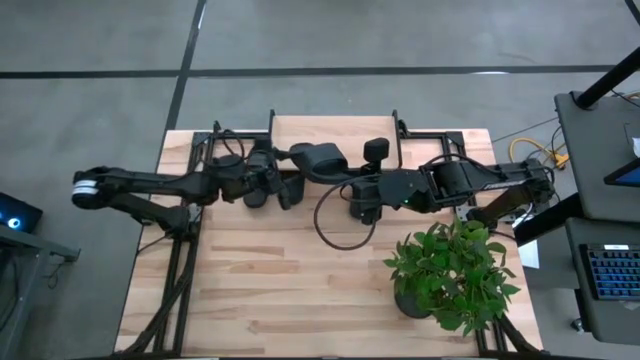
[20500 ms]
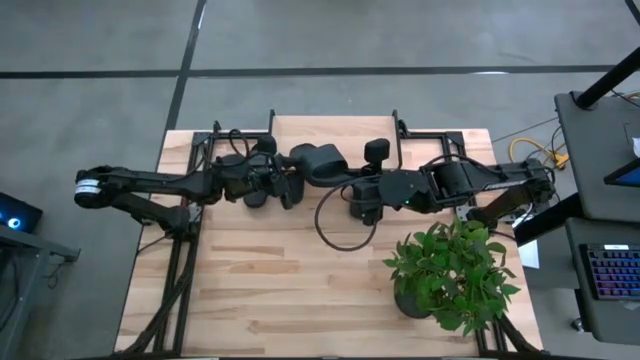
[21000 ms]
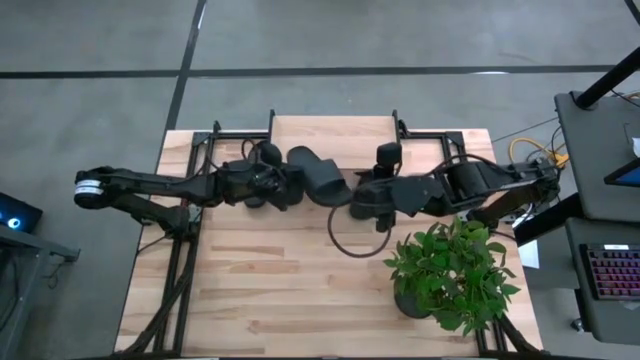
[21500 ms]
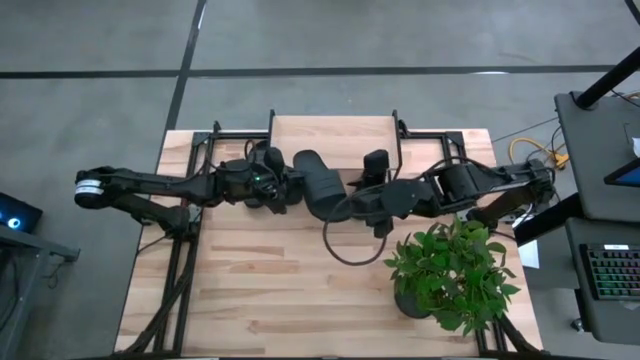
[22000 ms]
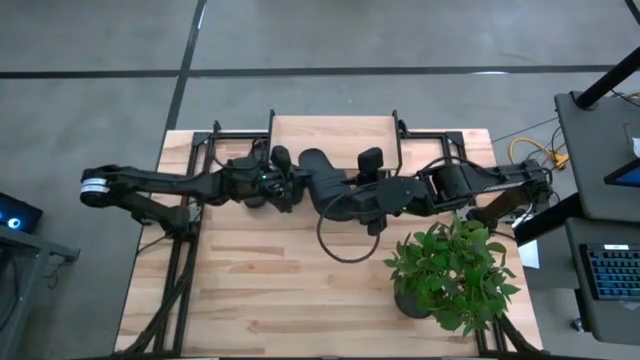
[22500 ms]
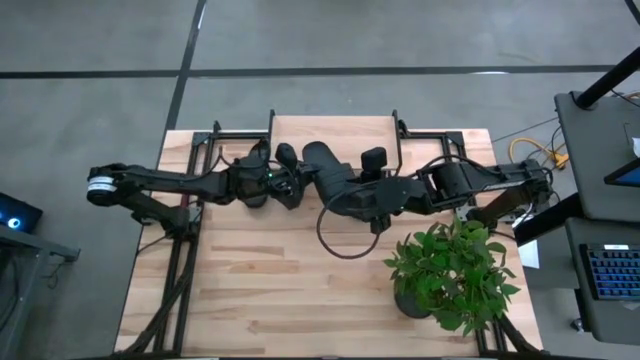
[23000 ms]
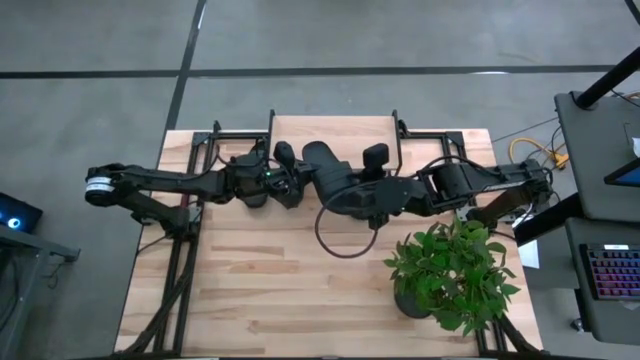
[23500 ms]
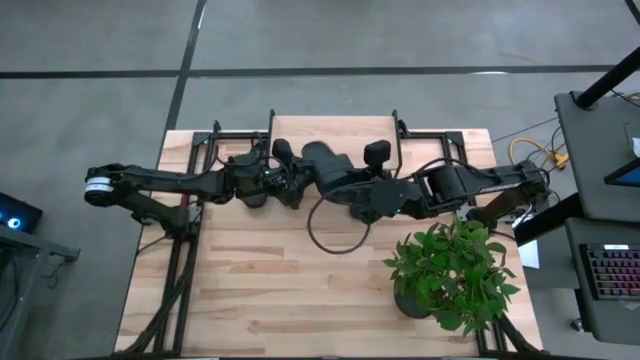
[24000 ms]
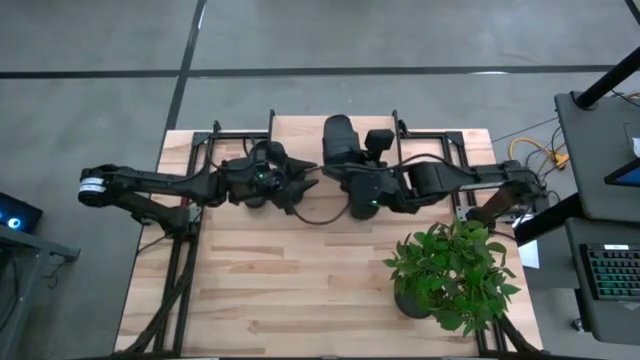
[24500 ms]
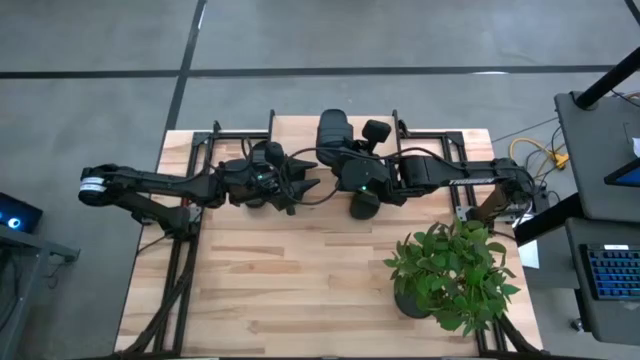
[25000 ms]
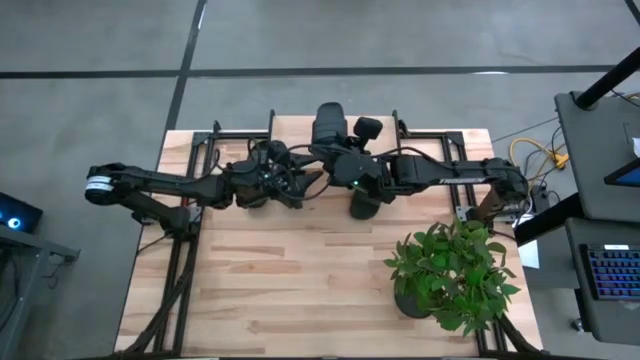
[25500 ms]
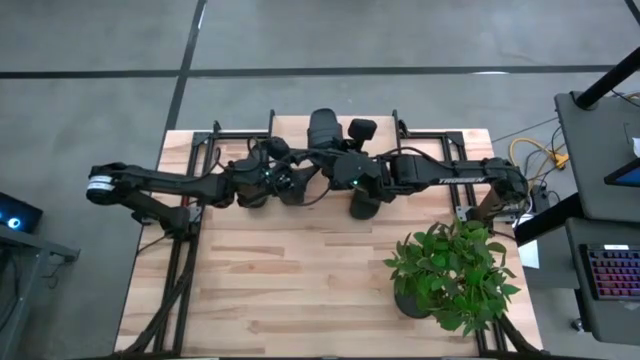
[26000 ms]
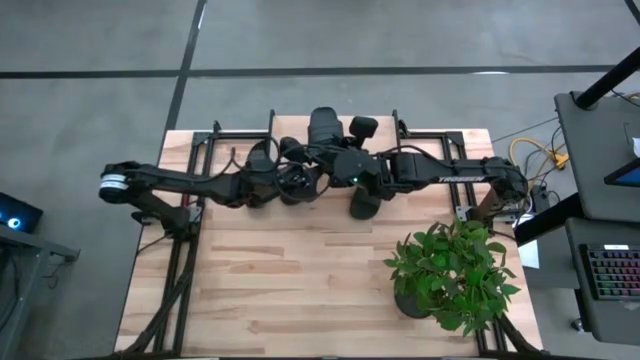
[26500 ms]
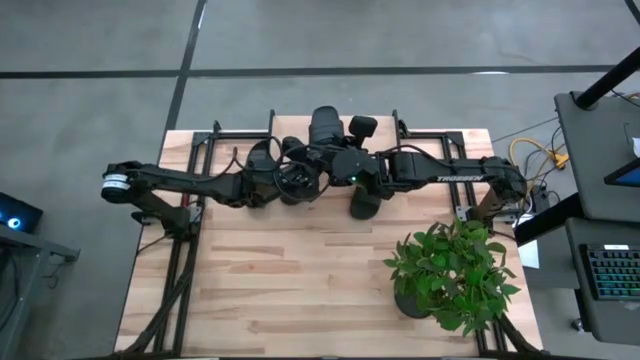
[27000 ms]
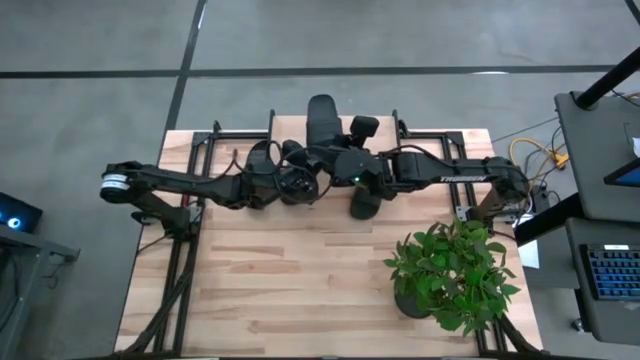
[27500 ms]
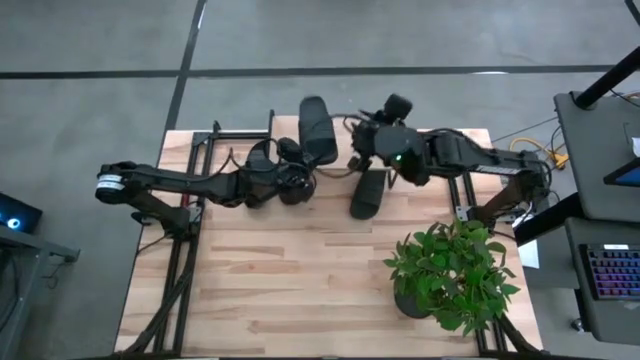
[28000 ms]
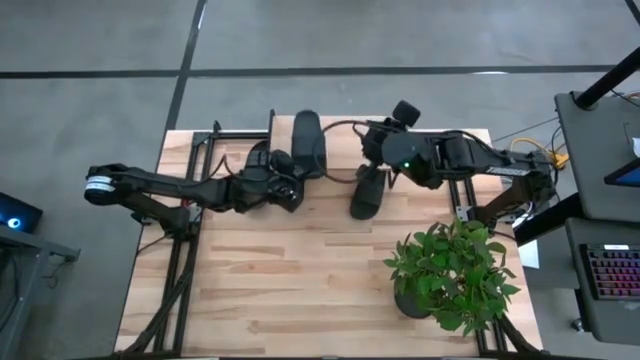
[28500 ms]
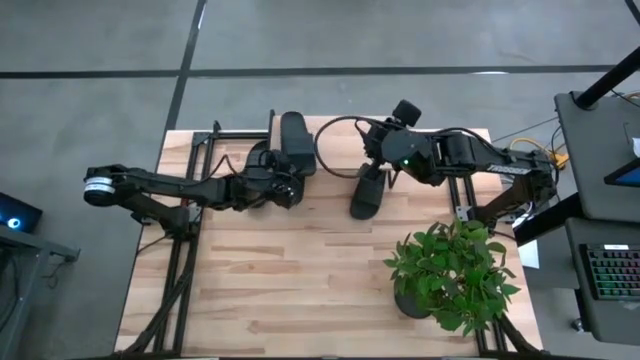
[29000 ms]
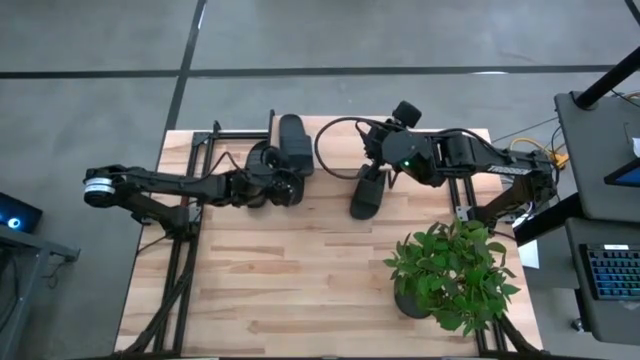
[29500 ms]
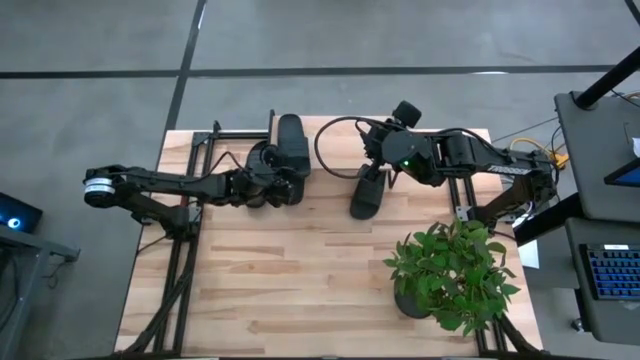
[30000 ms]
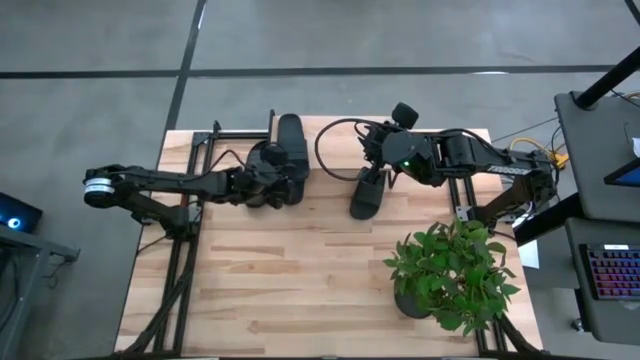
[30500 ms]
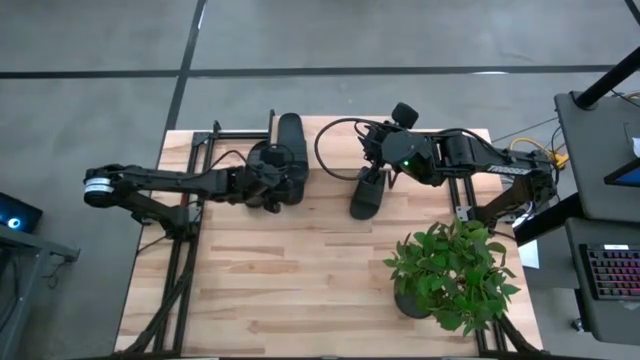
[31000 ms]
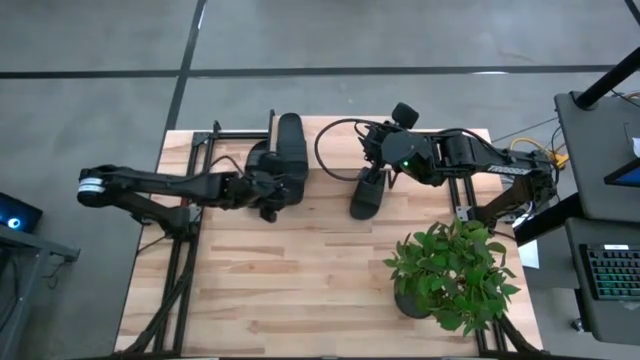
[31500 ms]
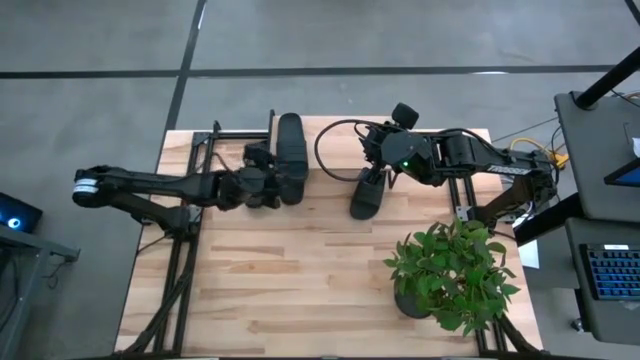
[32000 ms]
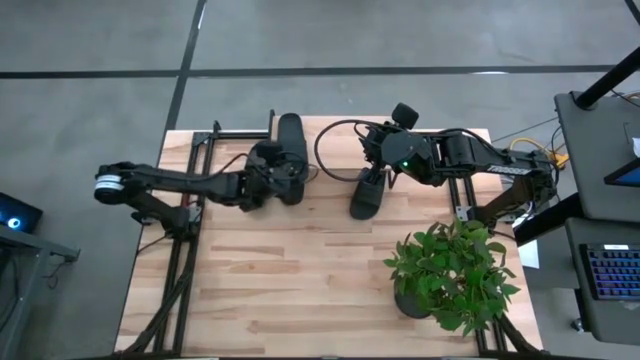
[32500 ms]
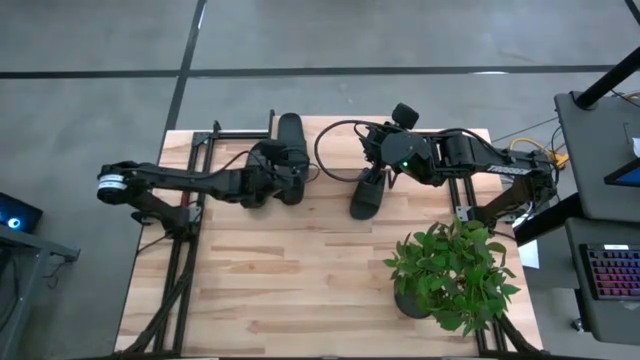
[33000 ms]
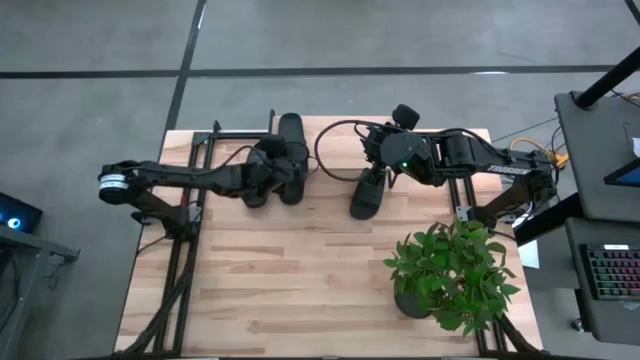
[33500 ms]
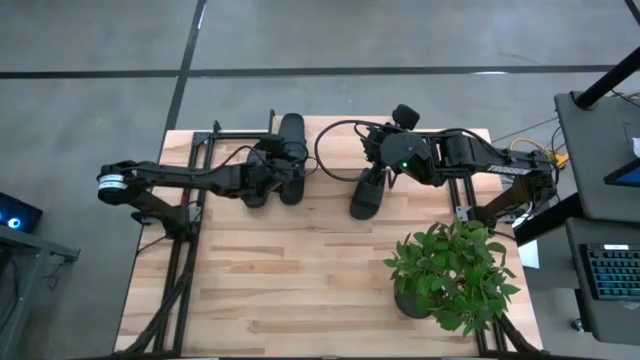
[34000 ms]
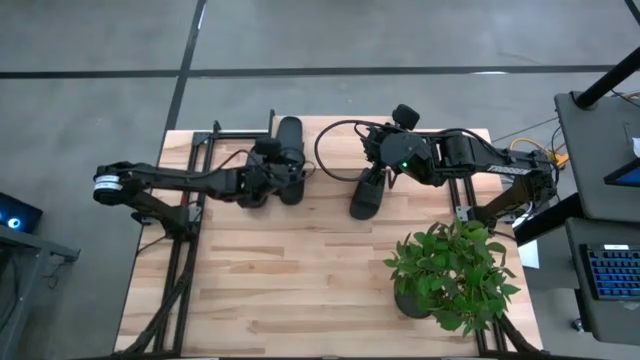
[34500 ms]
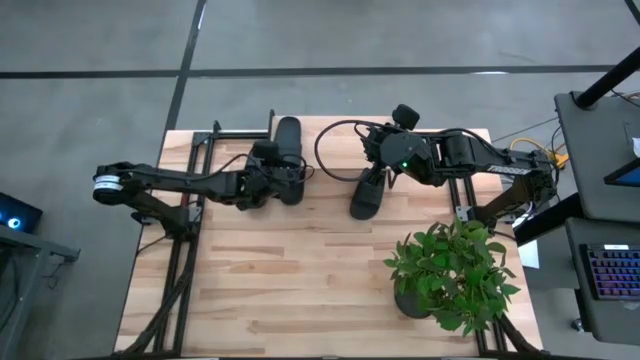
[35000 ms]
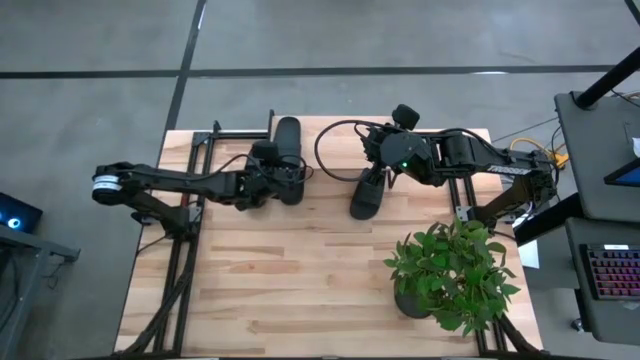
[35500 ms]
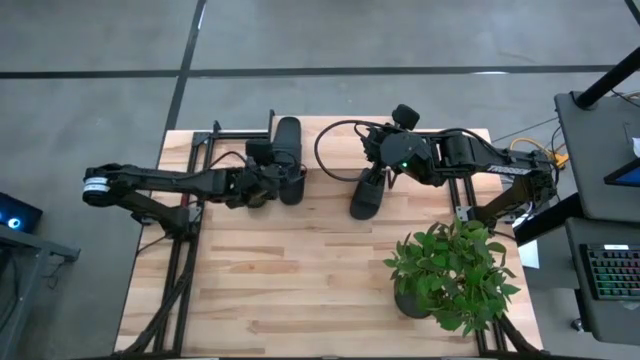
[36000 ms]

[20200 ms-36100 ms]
Task: Pick and place slides into the shelf
Put the black slipper on the shelf

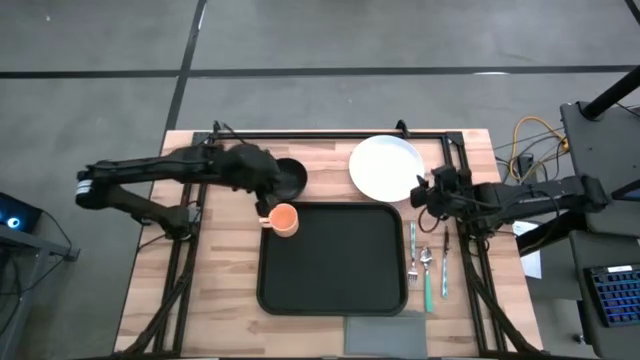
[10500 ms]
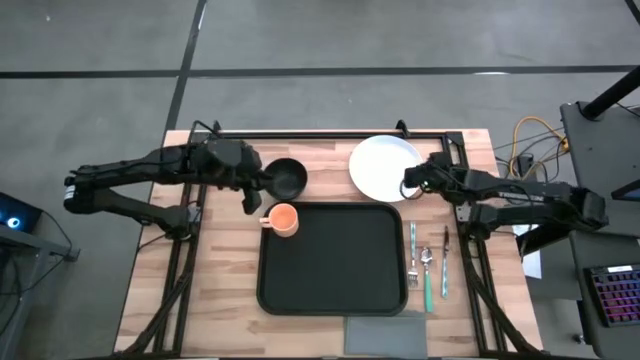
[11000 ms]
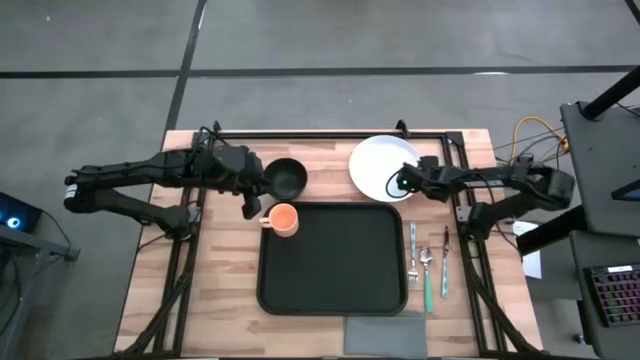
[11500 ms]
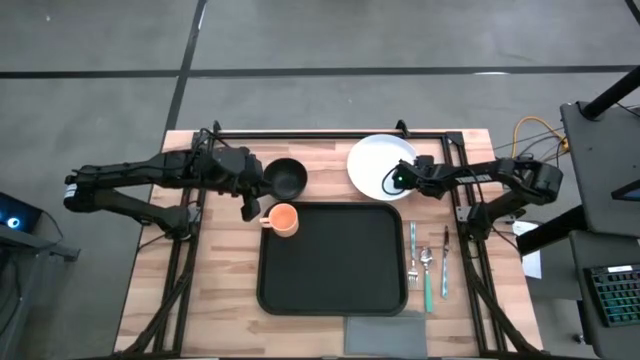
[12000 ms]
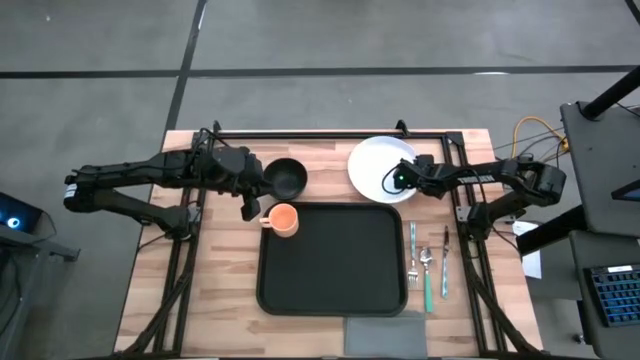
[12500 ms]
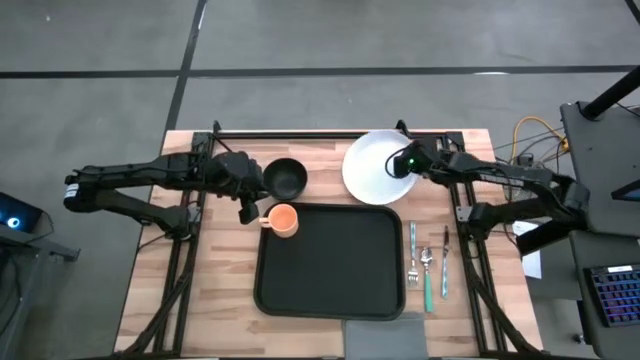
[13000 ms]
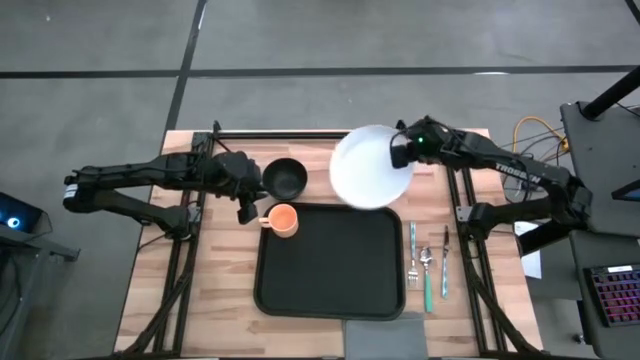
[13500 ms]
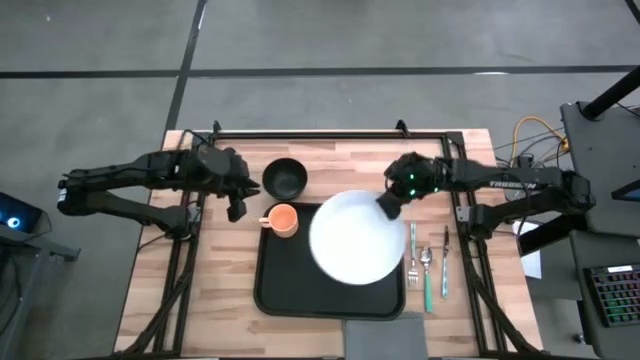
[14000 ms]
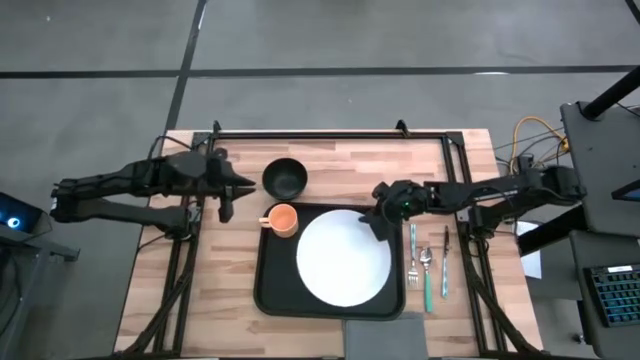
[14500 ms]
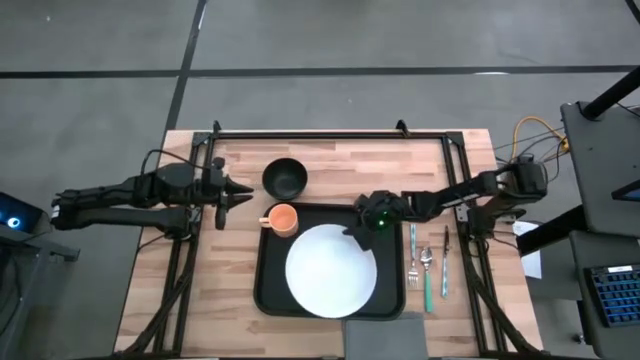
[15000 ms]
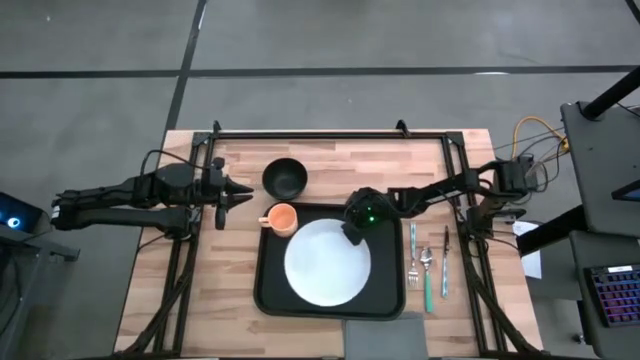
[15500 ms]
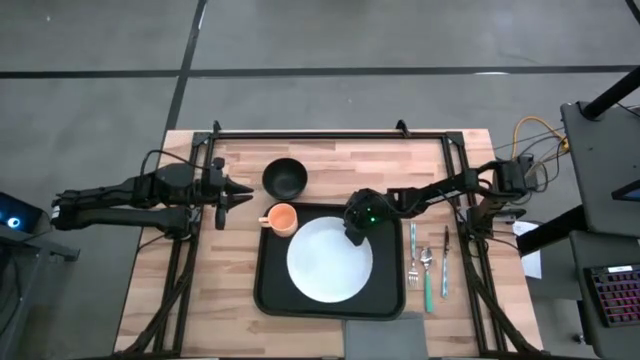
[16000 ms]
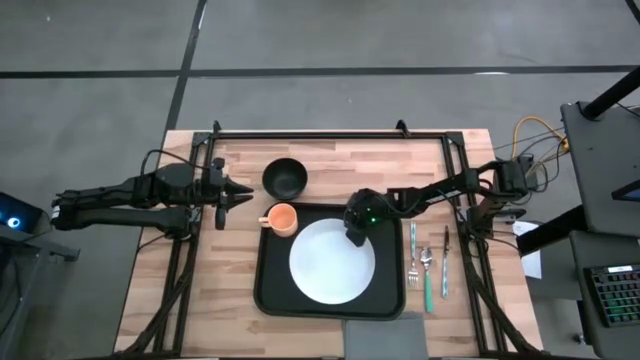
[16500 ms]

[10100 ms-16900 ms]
Task: Set up tray
Put the white plate on the black tray
